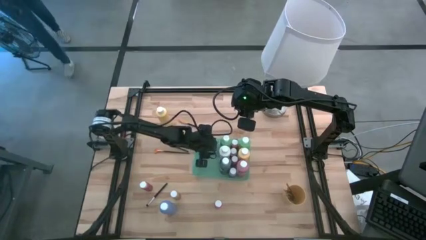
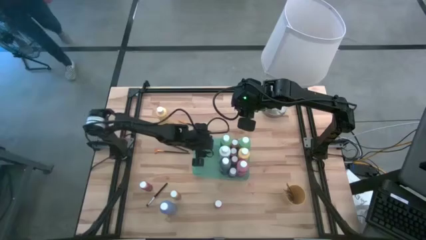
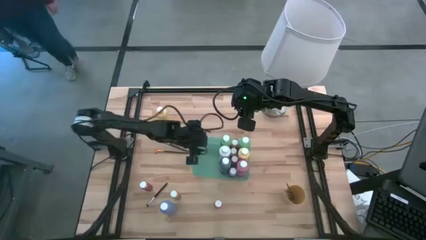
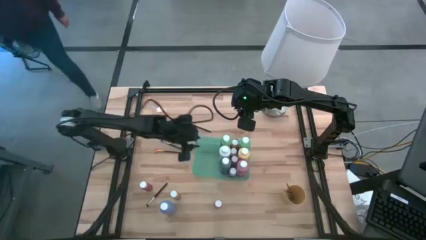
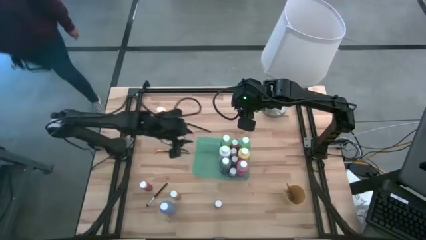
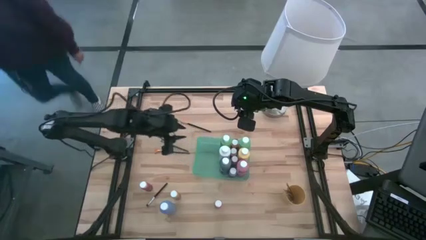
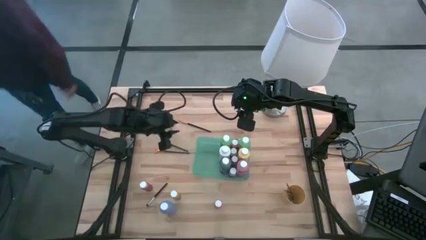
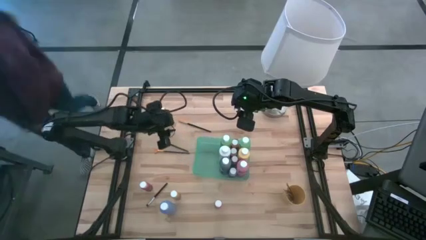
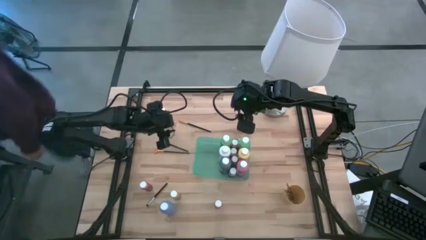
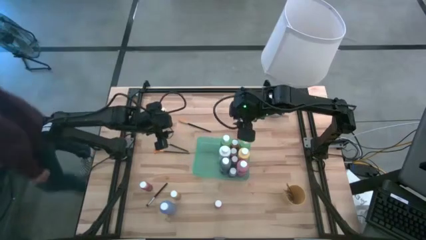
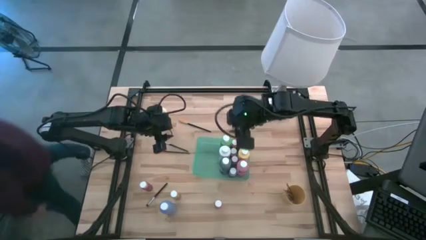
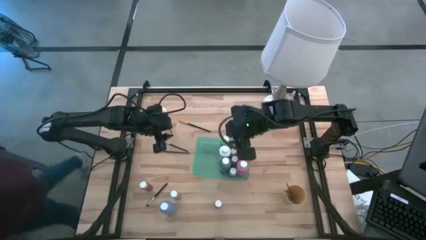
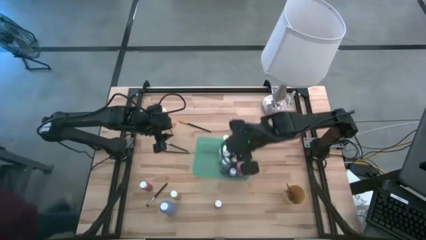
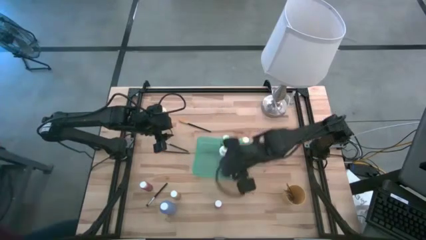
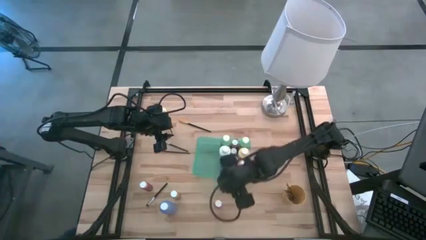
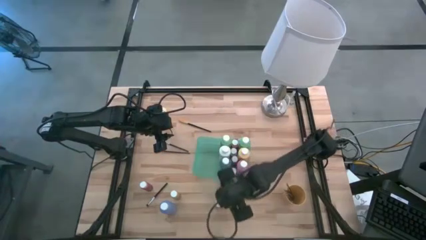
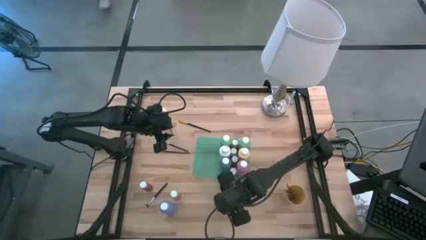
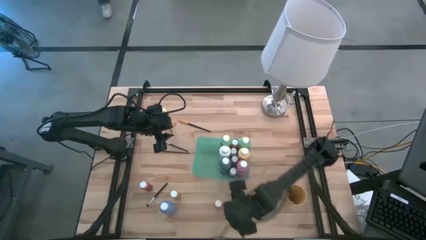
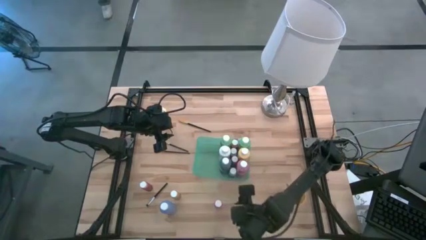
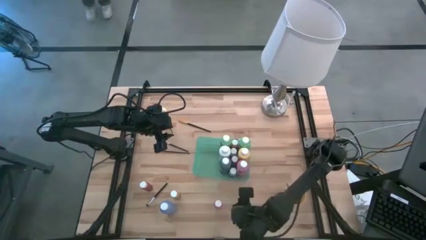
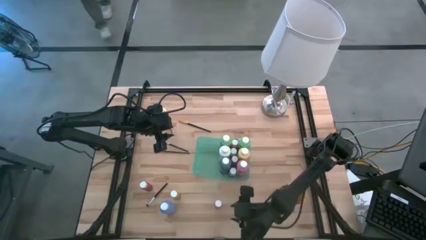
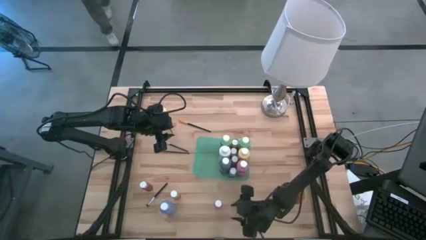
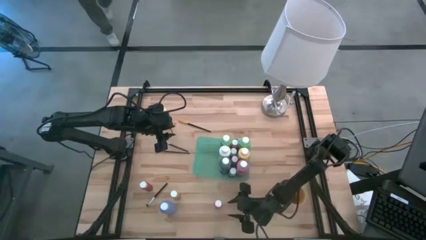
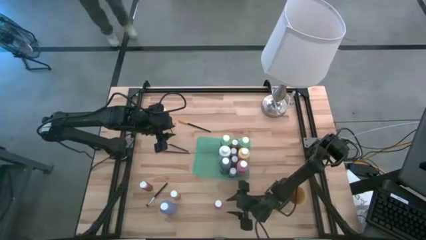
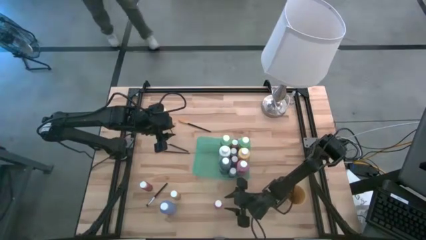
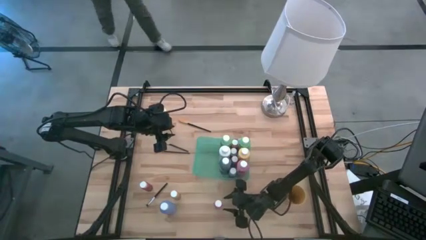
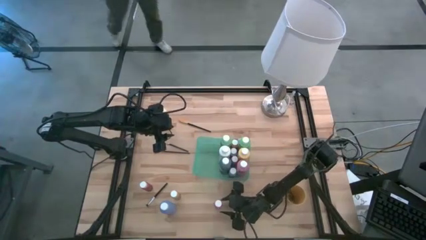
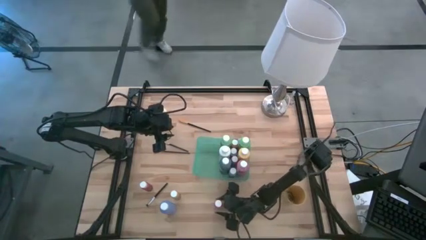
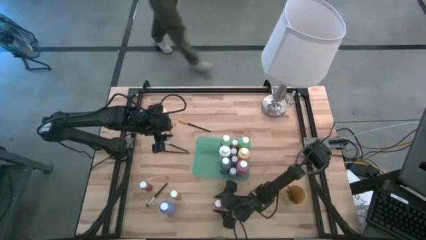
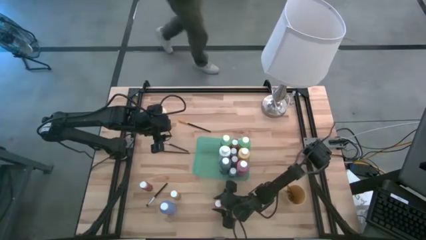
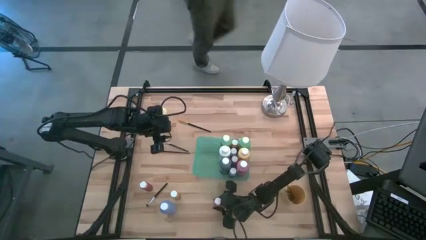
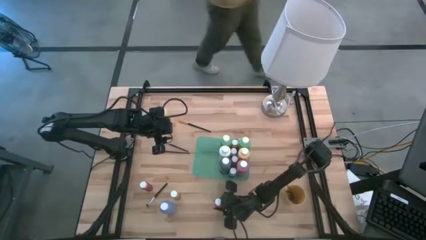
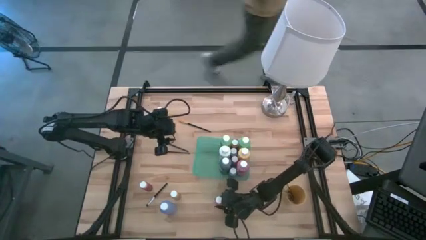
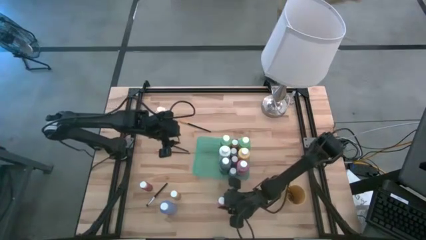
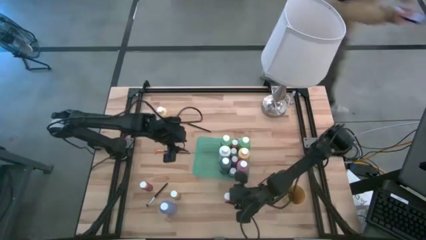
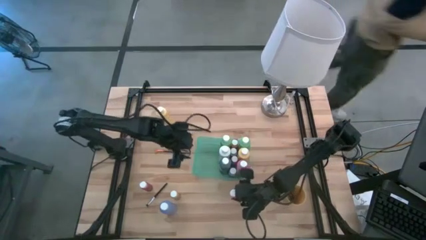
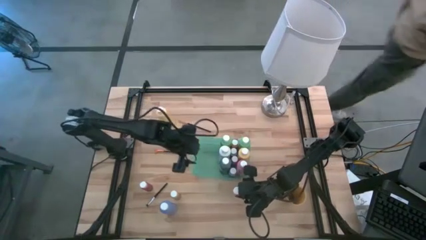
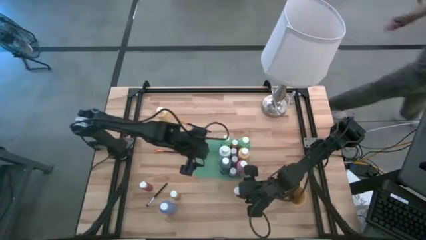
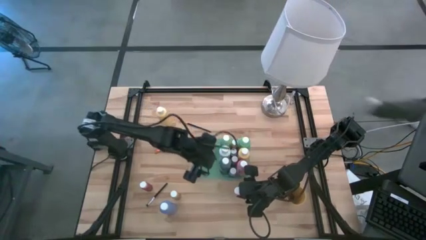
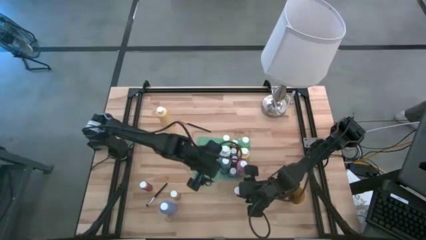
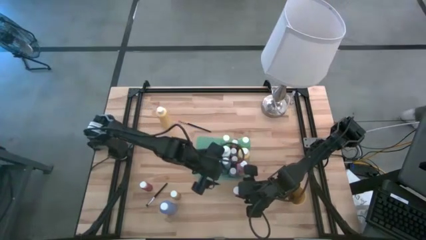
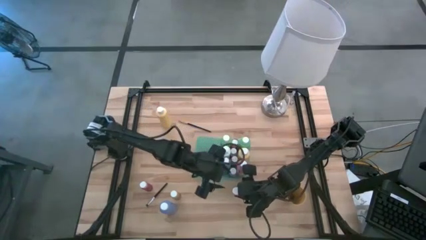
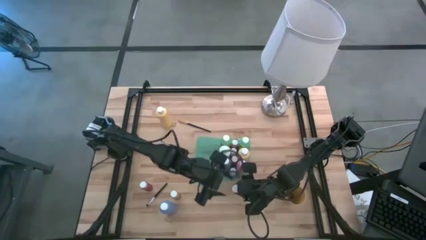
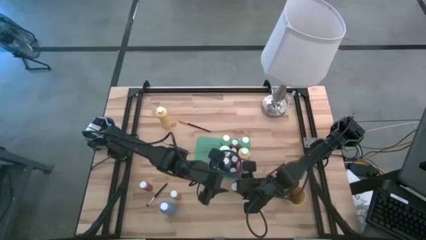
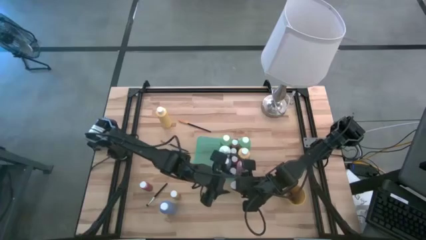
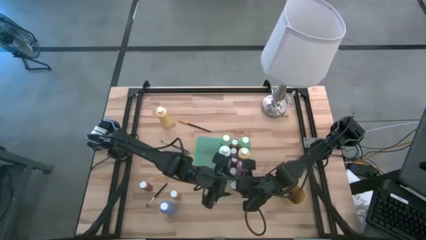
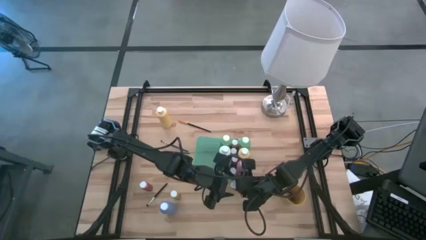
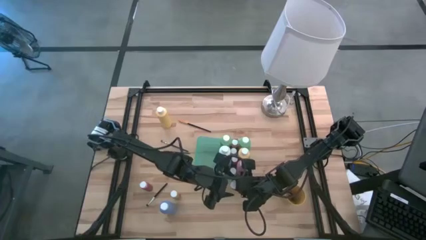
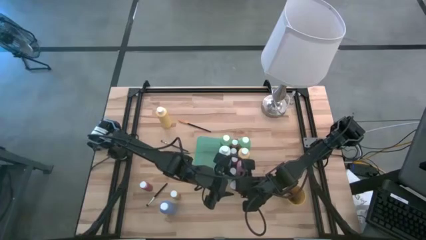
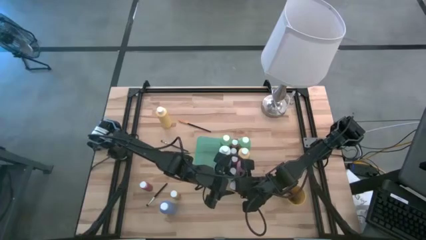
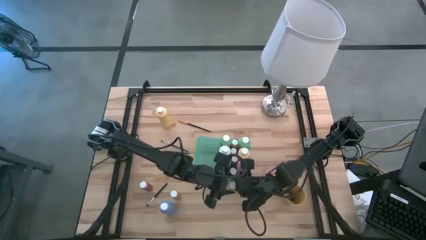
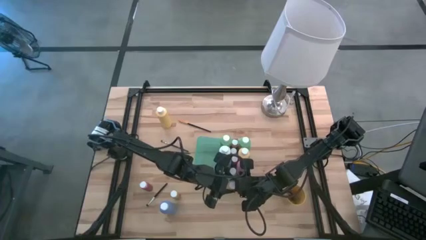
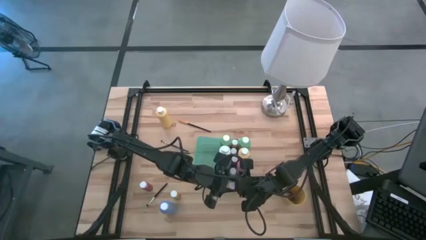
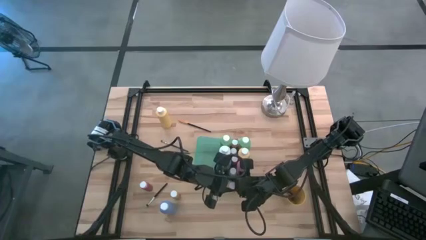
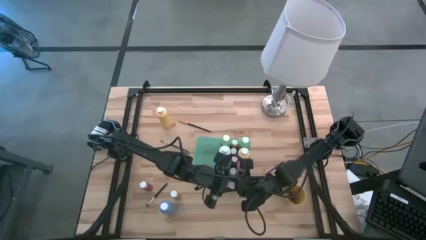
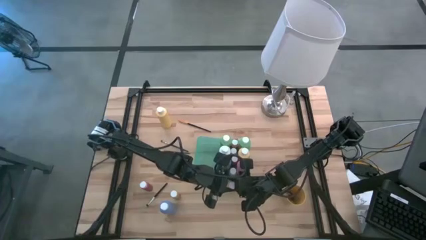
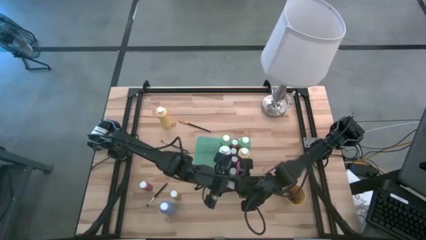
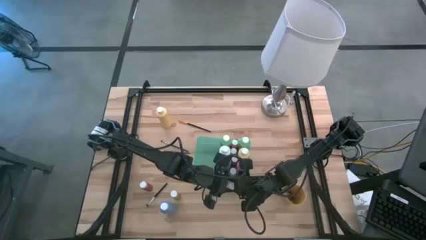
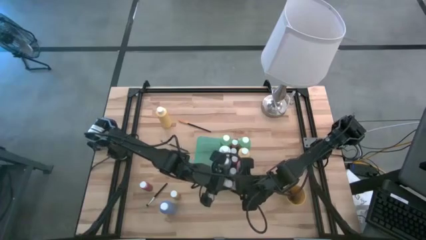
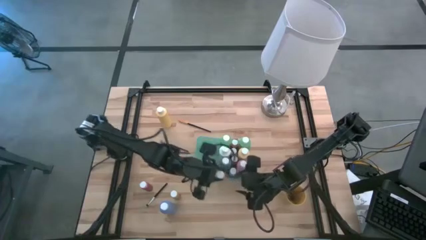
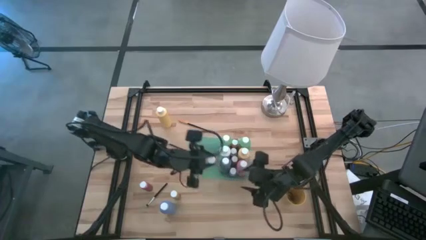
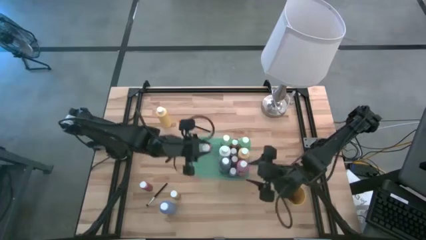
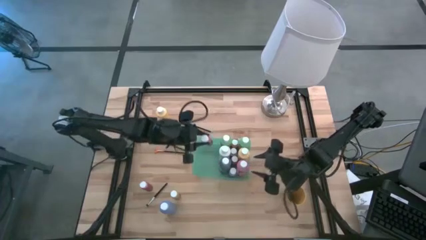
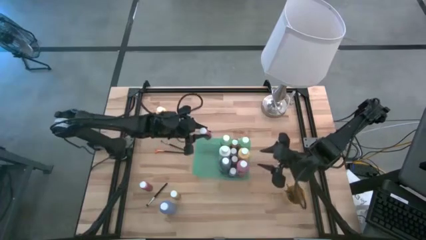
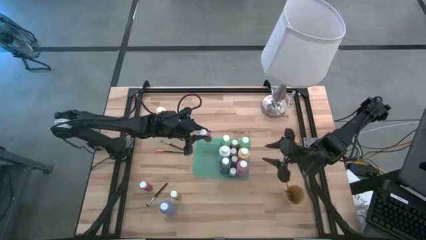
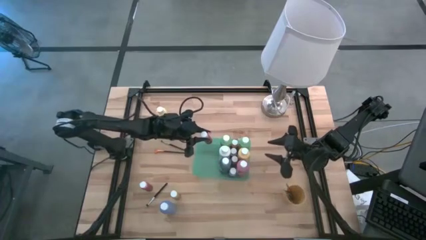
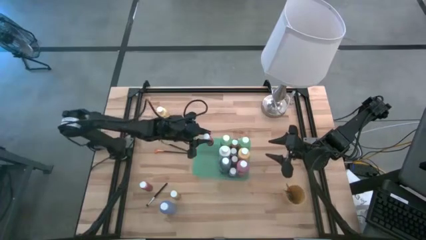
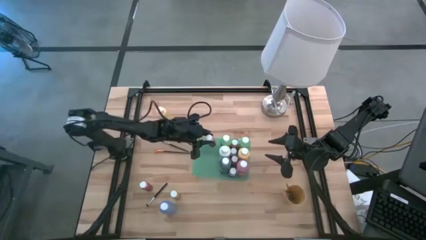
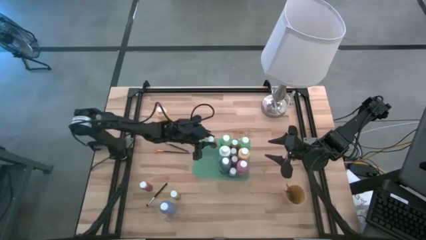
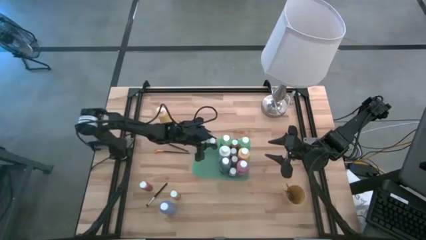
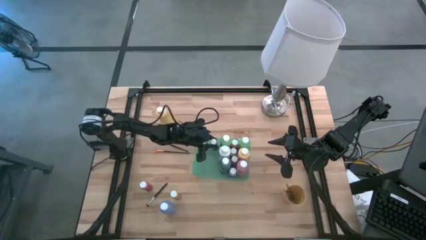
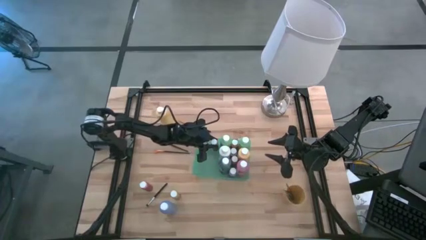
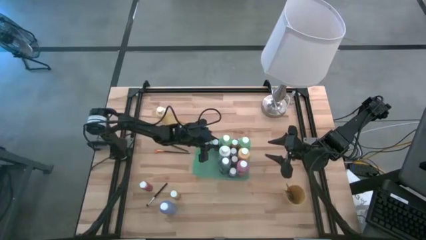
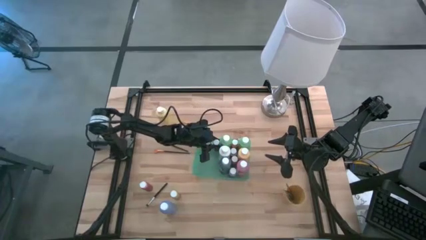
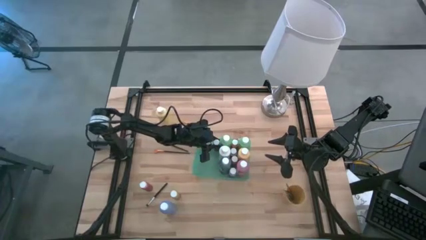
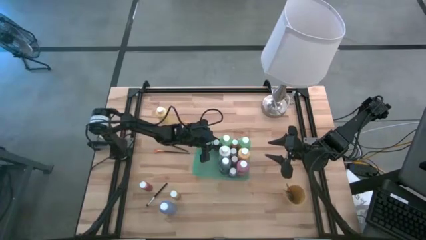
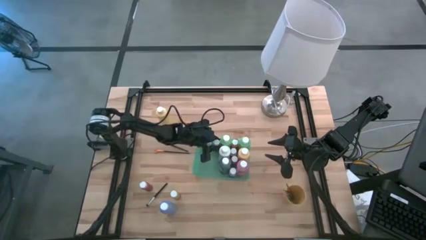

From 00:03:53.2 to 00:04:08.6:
Task: Pick & Place Paint Supplies
Put the orange paint bottle into the green bin
